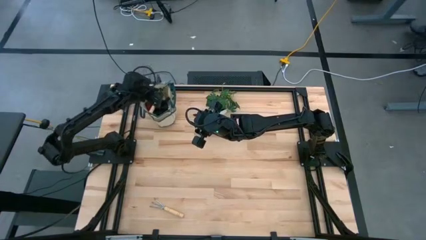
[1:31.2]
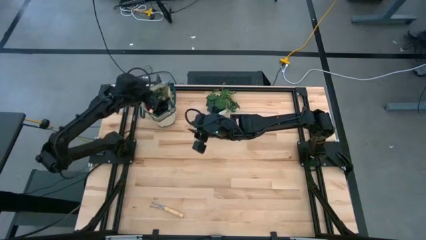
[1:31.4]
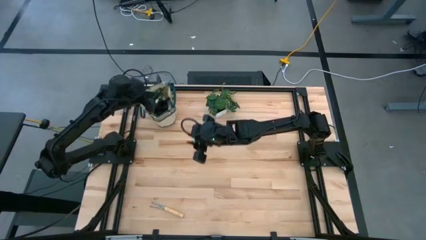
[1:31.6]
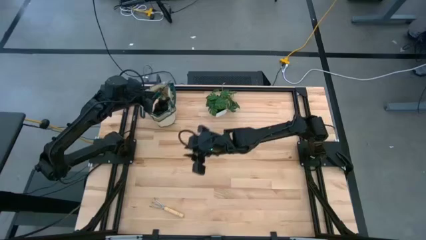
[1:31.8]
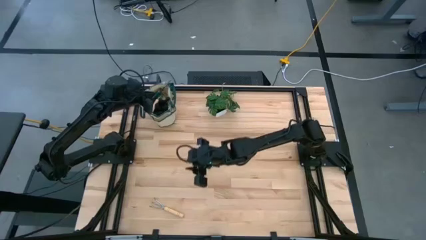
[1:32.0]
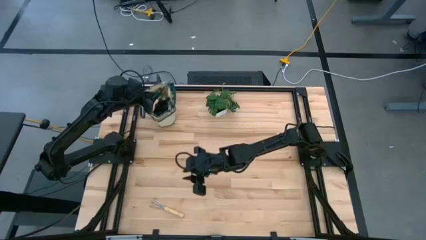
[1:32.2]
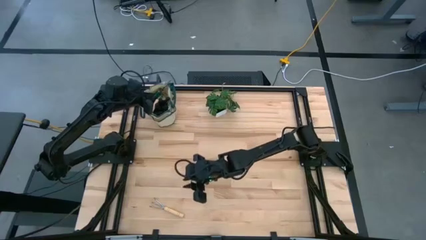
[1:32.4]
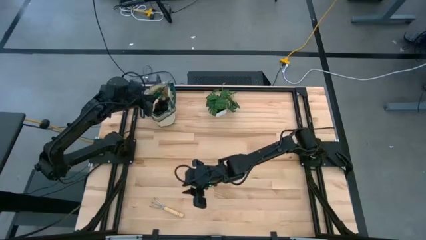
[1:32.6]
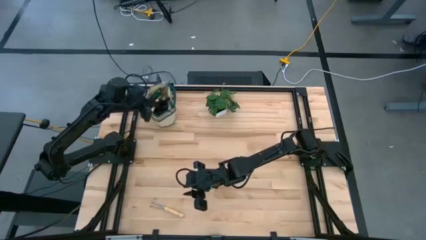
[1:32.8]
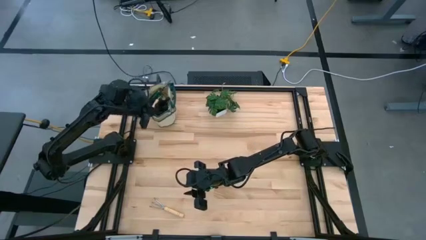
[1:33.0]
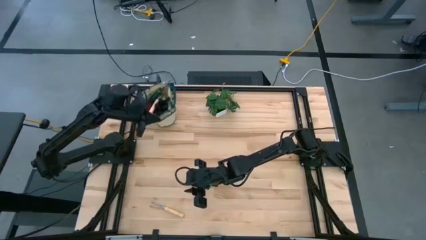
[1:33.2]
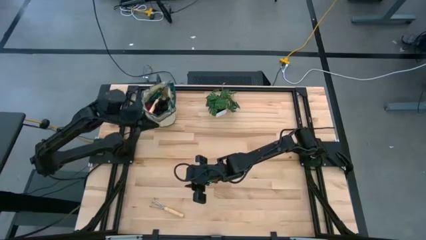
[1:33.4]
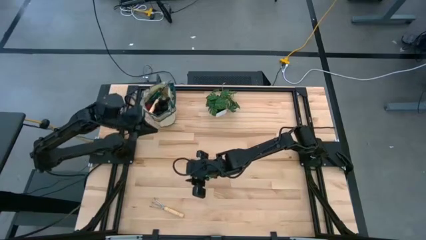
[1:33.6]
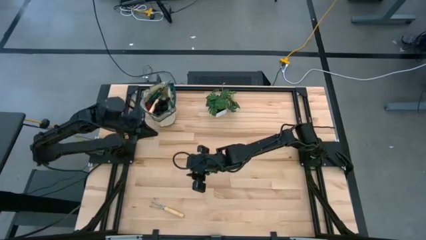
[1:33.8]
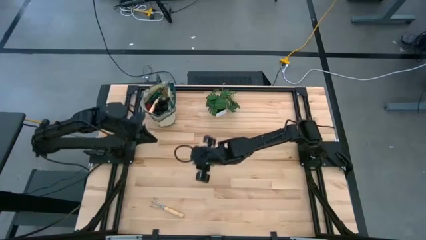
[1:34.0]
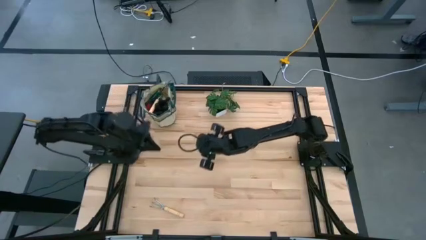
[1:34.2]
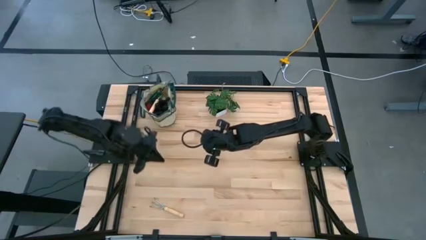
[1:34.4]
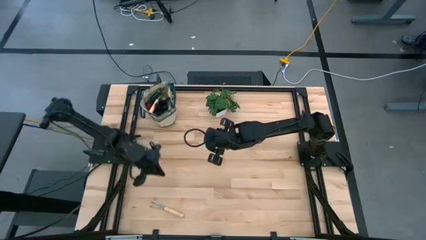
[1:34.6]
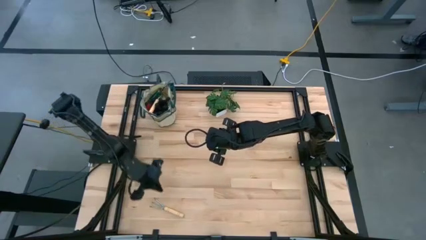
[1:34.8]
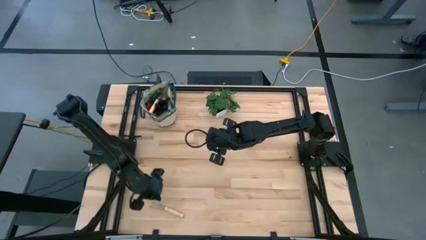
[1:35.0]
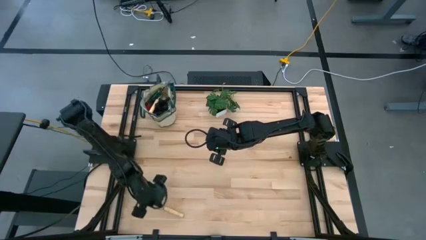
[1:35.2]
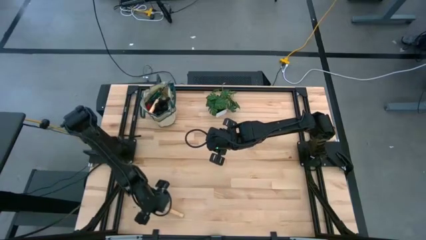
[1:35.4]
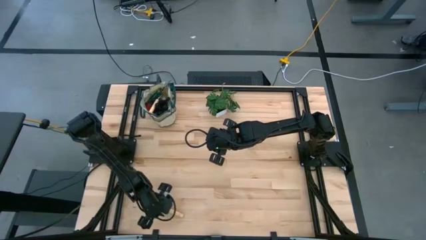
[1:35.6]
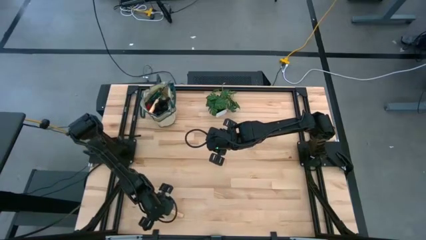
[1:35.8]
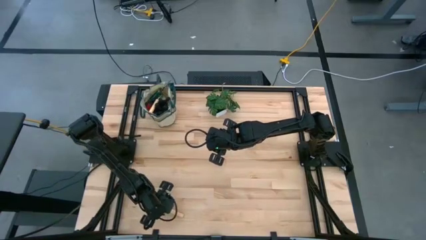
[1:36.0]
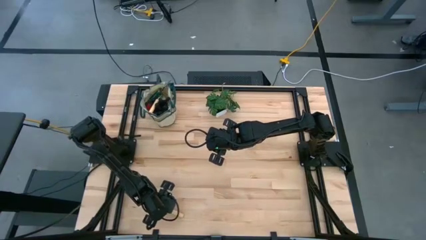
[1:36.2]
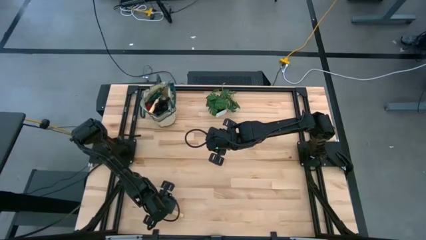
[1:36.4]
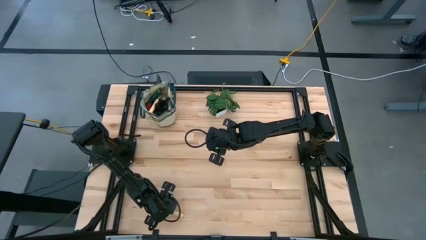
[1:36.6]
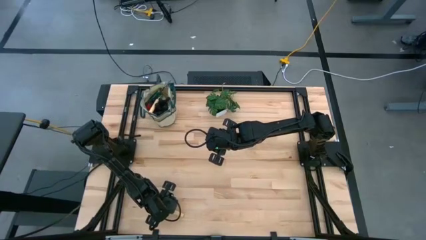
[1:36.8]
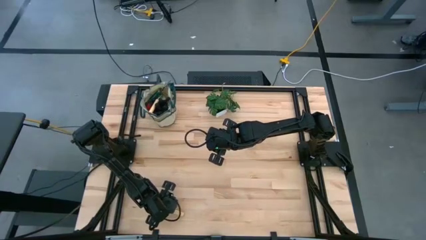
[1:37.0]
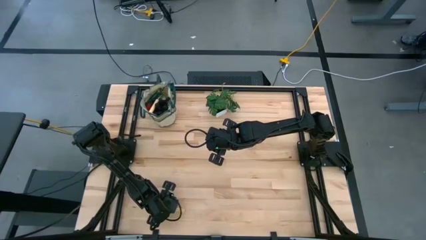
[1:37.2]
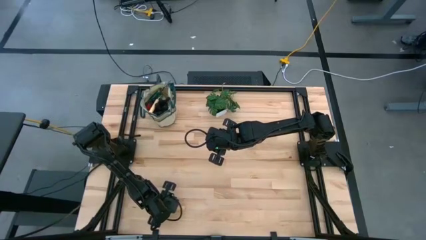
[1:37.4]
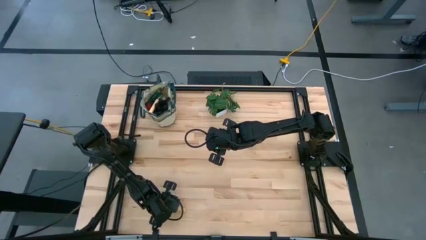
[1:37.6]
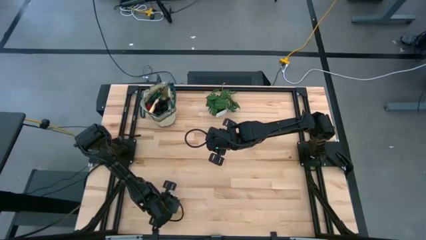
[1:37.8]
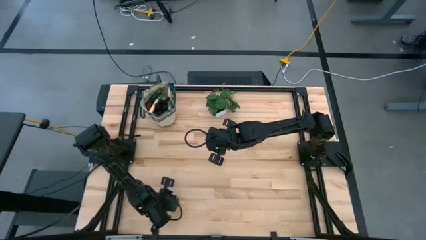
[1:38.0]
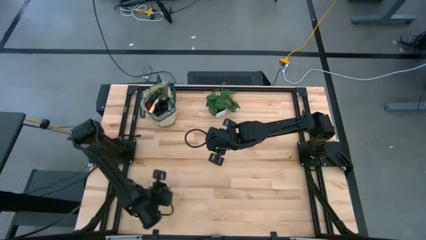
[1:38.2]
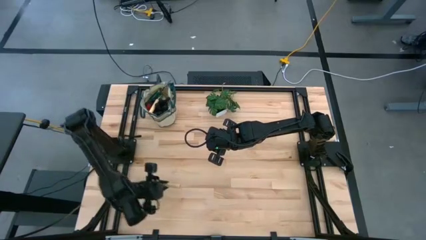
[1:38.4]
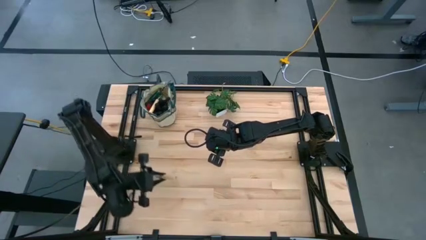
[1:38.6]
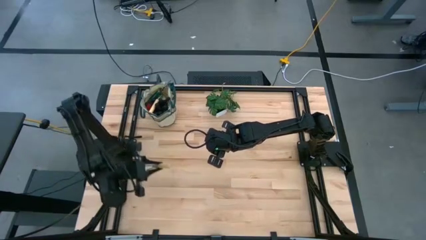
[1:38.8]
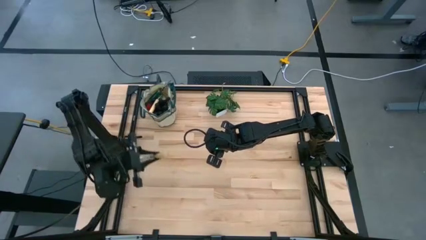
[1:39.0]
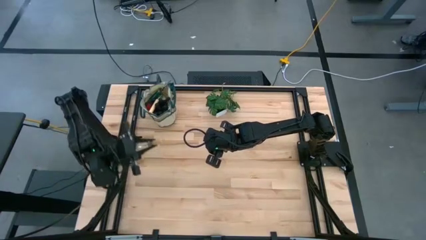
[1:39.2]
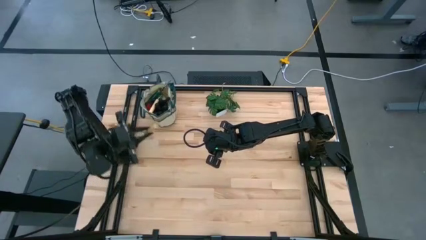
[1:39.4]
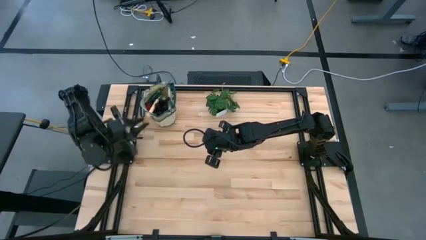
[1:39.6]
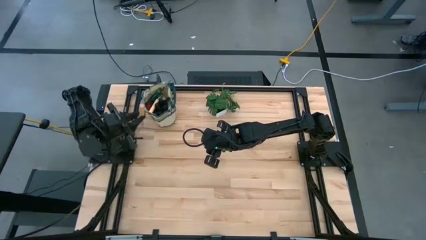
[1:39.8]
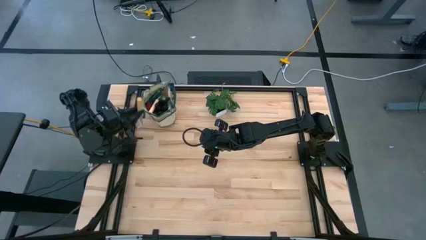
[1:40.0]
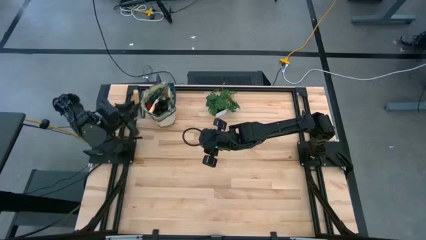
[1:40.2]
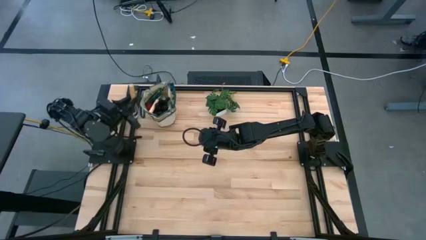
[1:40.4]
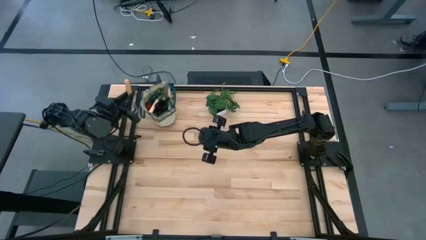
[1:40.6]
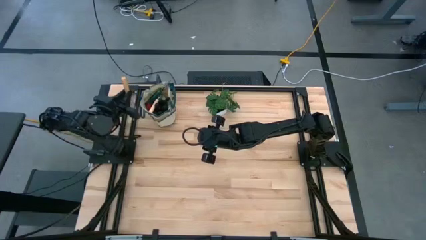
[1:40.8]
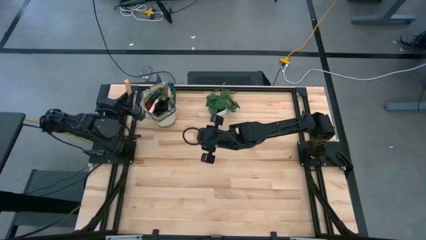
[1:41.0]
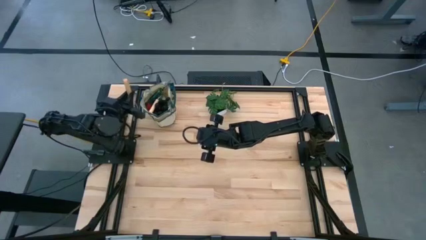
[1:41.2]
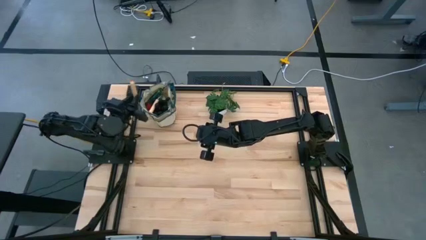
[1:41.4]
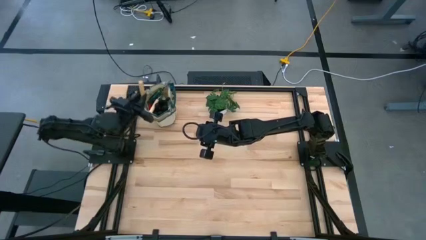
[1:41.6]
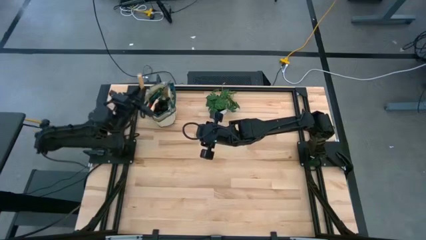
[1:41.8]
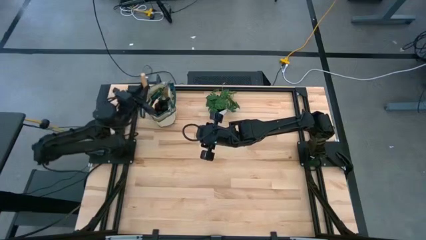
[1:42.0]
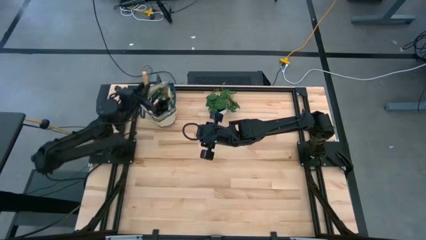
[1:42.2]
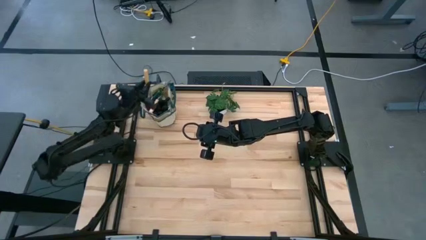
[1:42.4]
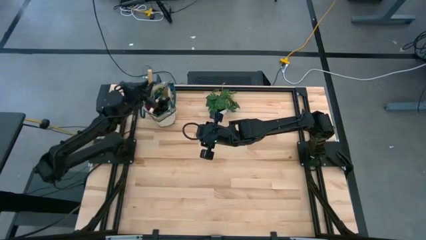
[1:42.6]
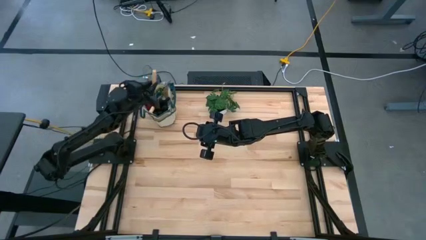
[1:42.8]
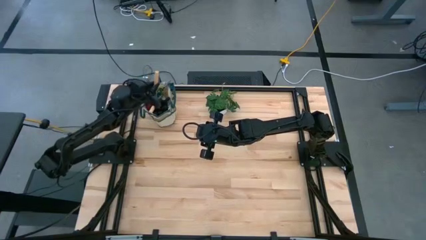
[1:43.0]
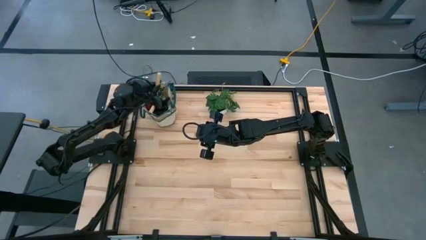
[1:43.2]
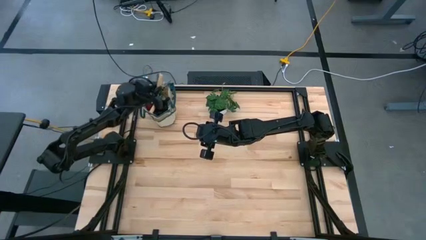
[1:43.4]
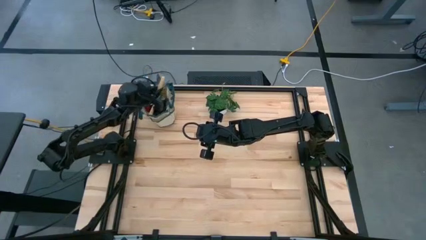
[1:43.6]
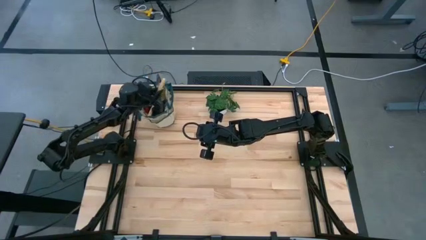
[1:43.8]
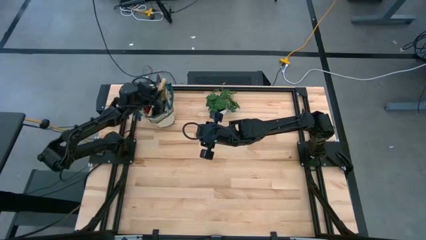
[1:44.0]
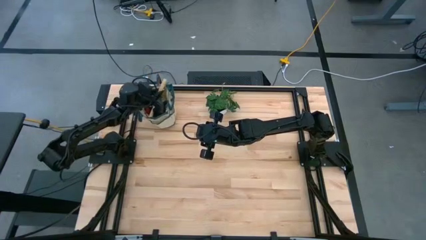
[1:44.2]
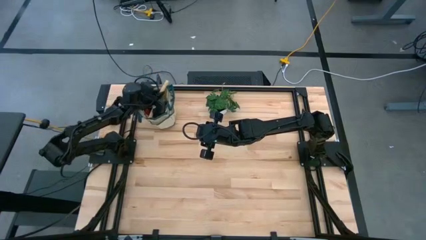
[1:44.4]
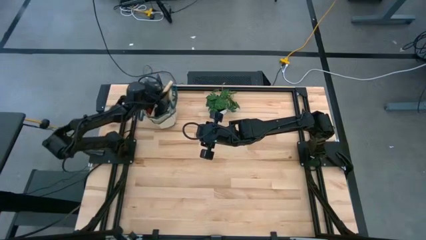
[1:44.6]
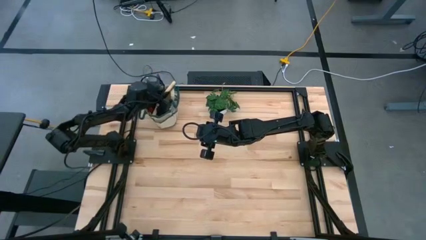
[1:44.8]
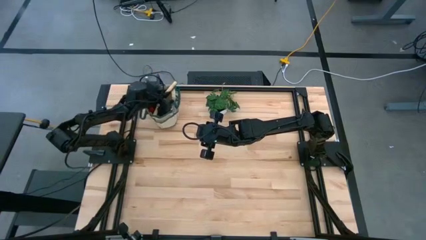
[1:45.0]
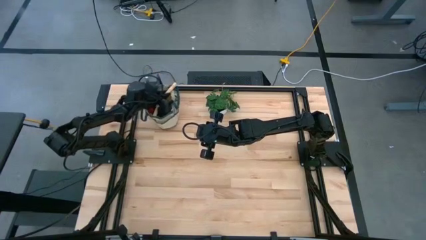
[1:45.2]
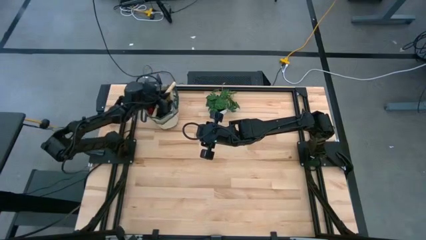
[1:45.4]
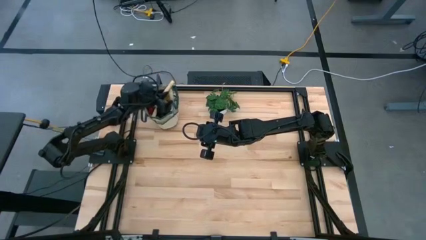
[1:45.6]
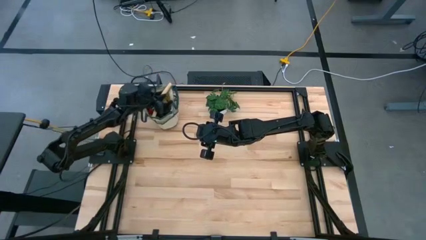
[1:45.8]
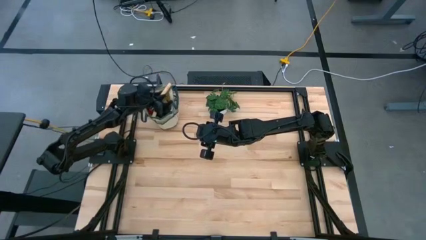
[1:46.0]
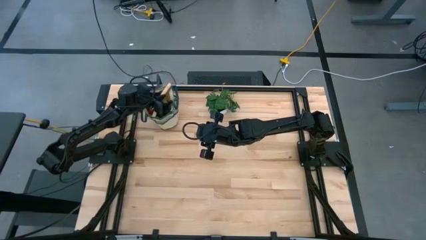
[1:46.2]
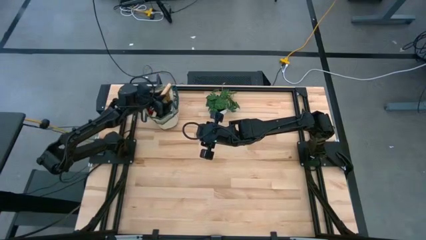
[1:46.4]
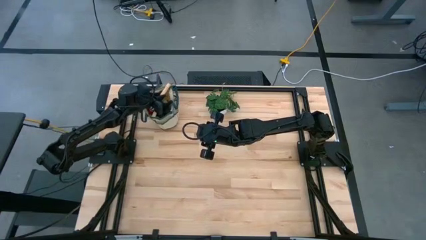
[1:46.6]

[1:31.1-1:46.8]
Task: Pick & Place Garden tools in Gardening bag
Put the light brown hand rake into the green gardening bag
